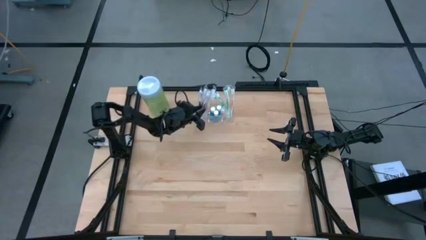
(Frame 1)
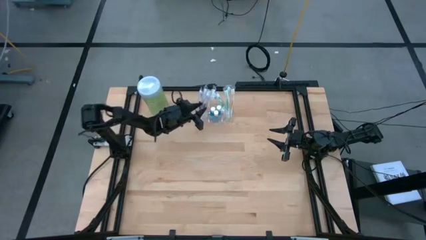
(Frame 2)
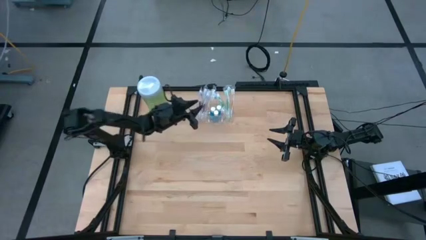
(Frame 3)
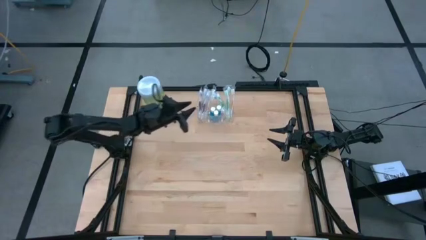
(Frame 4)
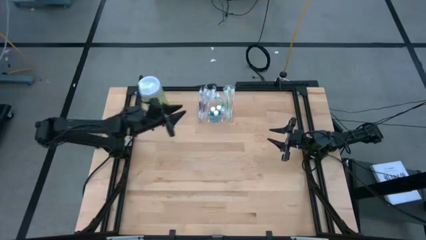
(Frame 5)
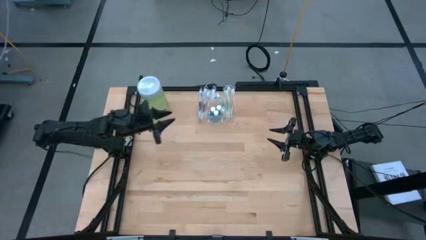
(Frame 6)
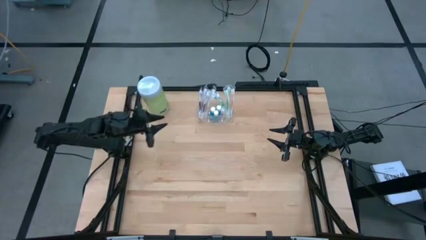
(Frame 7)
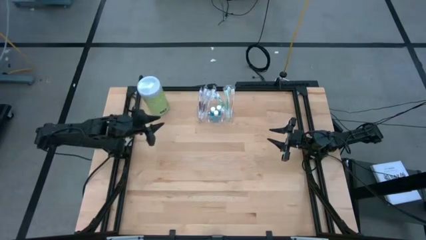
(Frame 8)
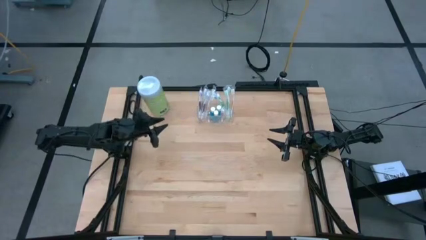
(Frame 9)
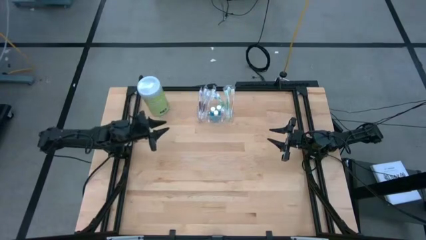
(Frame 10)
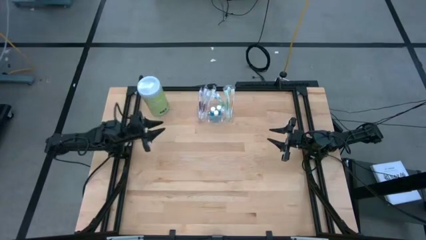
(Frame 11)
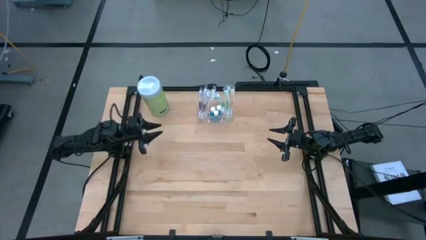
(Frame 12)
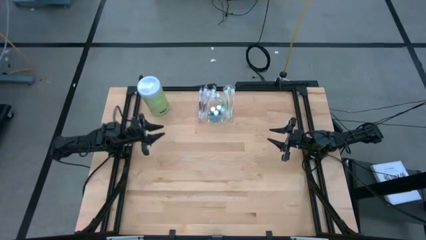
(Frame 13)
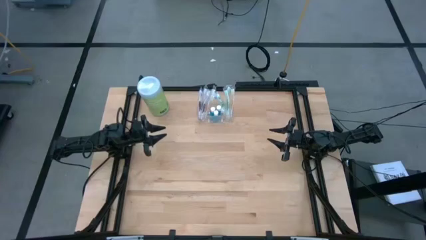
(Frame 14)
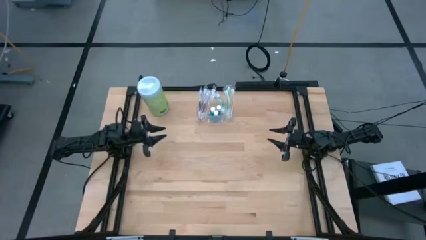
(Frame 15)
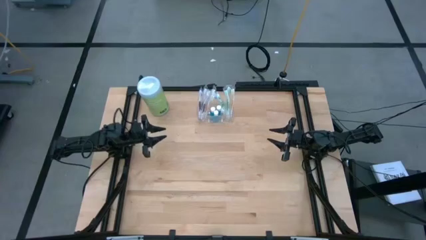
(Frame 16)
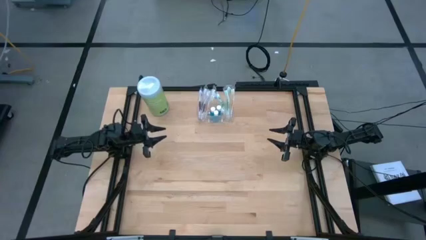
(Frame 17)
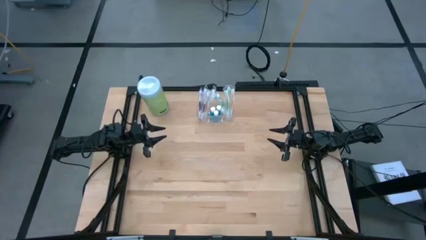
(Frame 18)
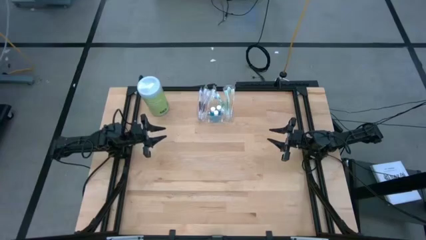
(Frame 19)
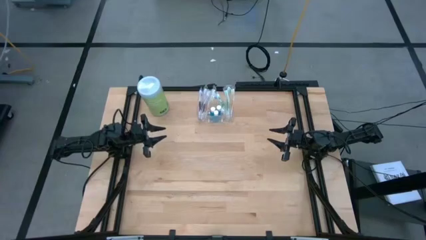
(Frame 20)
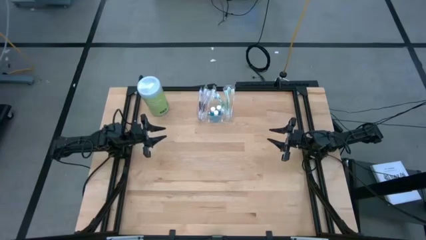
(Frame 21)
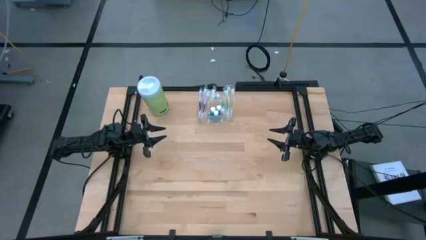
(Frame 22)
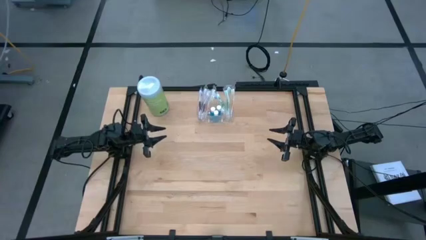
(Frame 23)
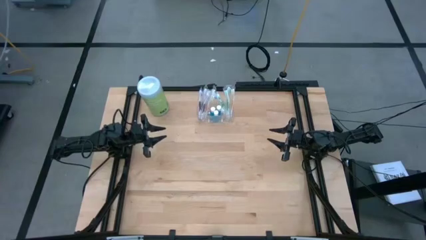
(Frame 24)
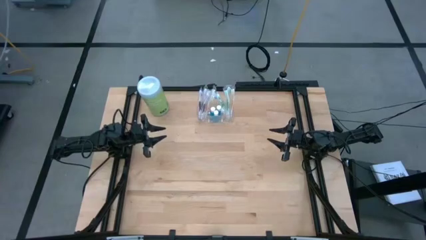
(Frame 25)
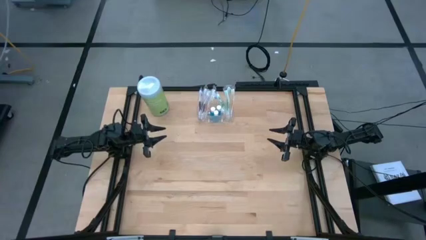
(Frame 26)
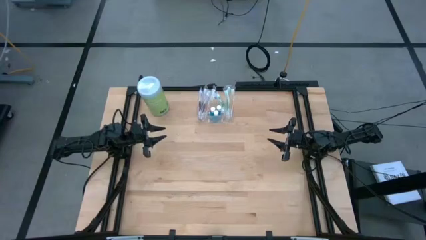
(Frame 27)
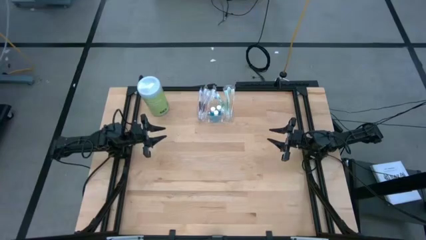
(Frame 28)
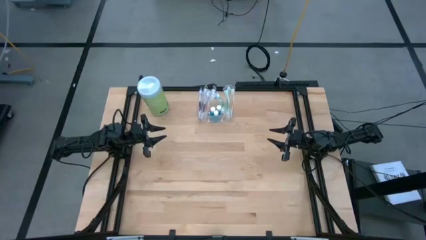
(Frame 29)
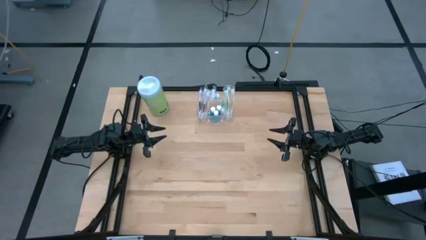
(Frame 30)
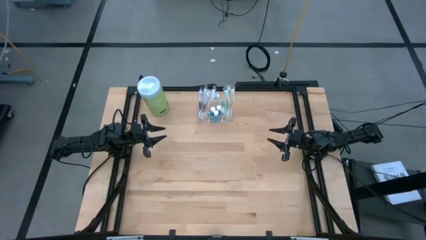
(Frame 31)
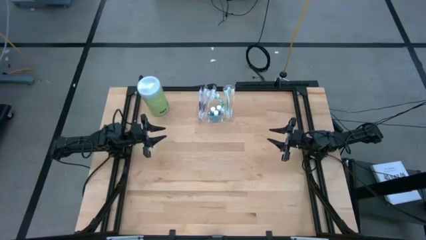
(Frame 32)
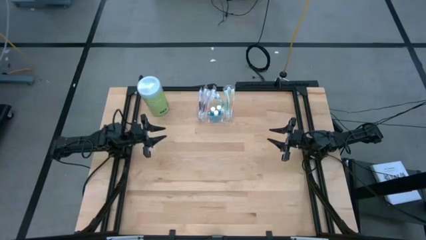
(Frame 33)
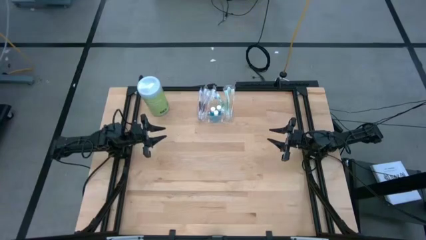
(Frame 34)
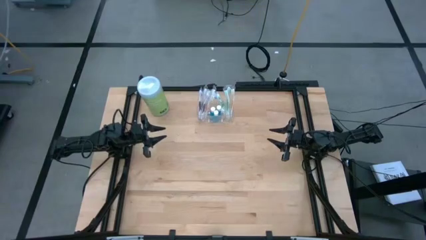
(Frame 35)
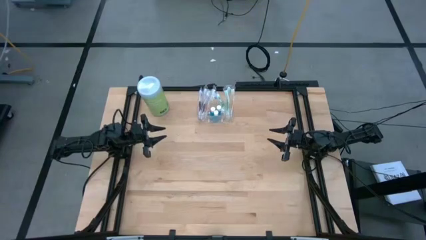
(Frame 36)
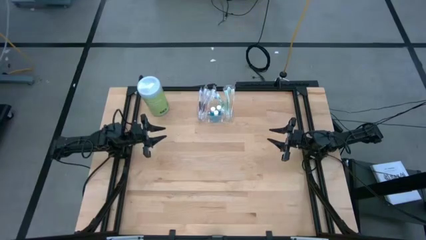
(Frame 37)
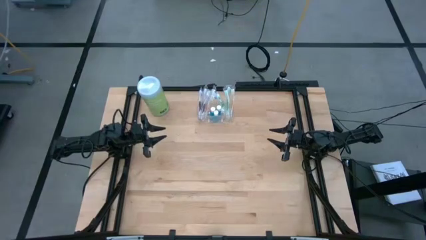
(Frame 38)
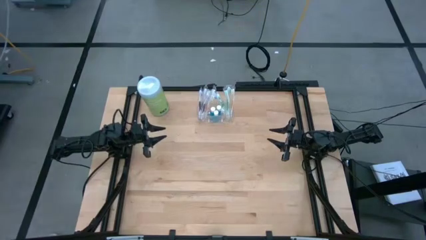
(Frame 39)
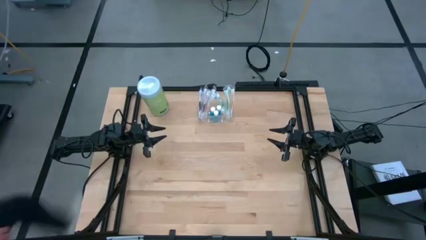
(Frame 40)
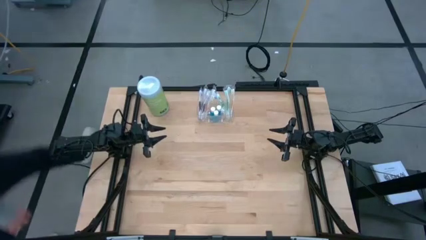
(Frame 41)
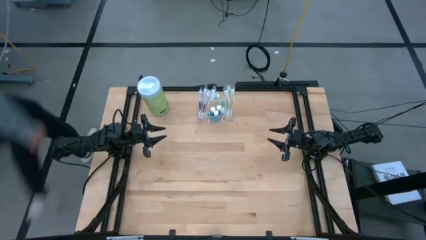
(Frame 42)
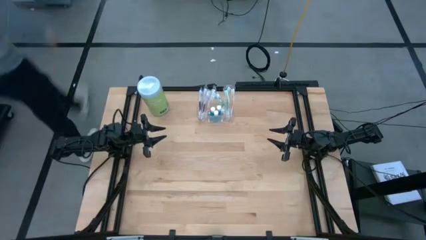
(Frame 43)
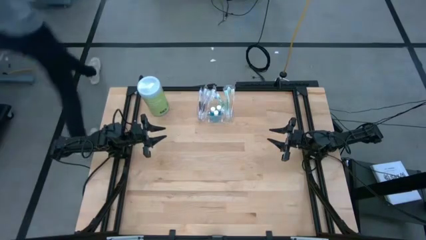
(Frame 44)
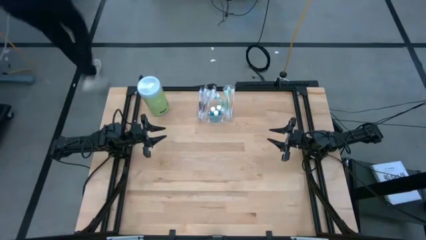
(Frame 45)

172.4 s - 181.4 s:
Task: Pick & Place toothbrushing station
Return to Home Position

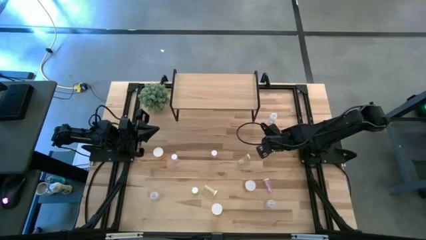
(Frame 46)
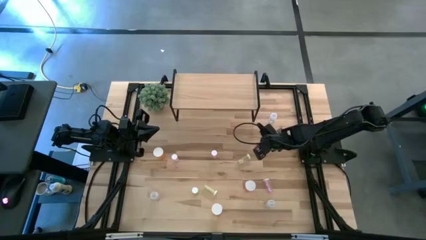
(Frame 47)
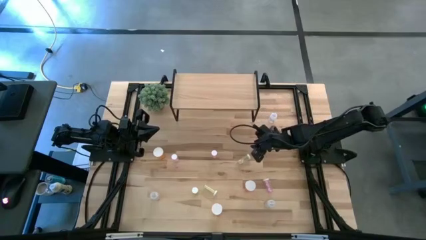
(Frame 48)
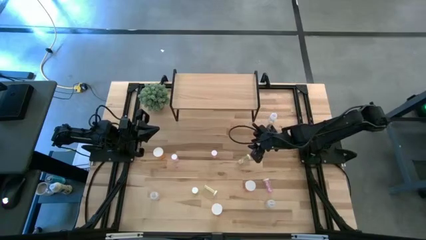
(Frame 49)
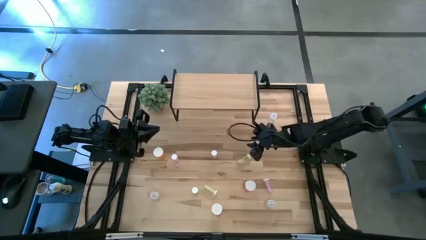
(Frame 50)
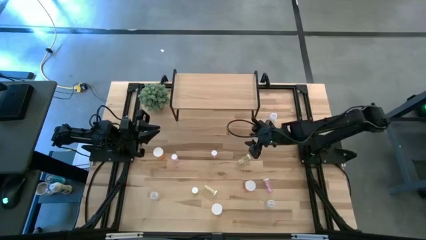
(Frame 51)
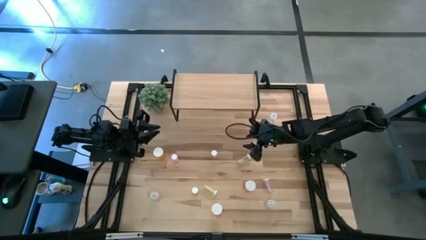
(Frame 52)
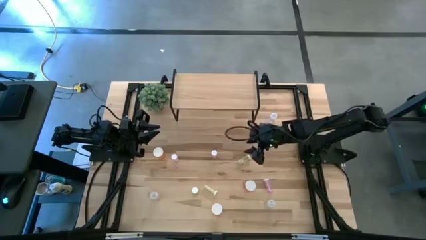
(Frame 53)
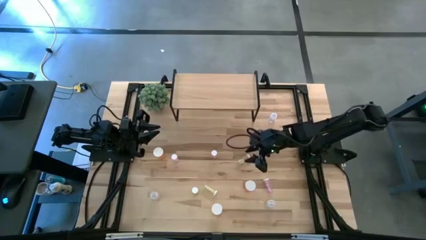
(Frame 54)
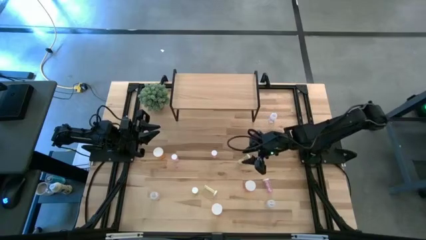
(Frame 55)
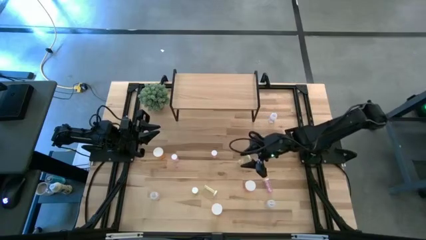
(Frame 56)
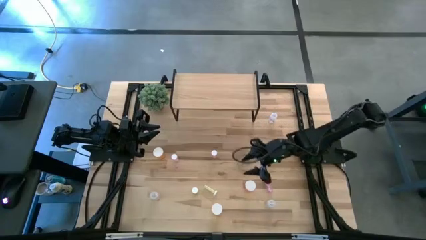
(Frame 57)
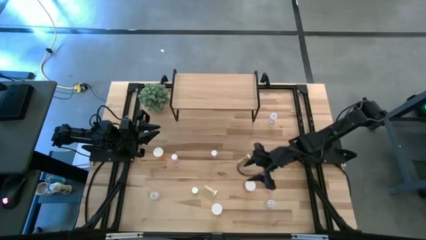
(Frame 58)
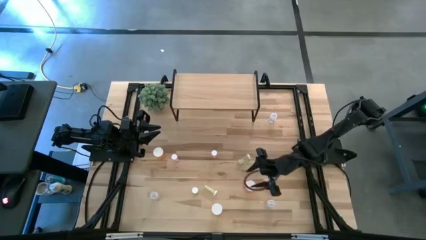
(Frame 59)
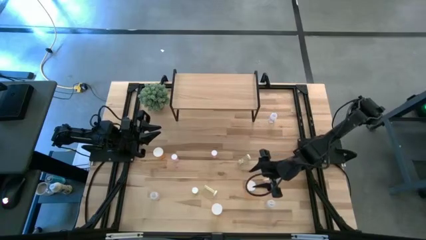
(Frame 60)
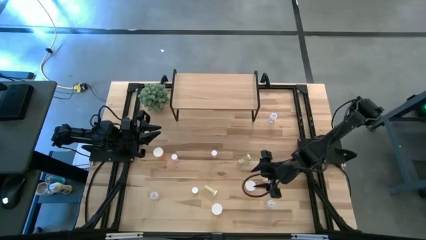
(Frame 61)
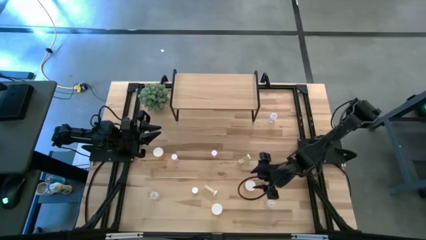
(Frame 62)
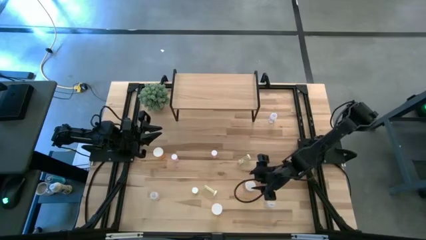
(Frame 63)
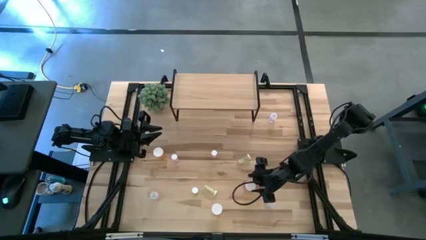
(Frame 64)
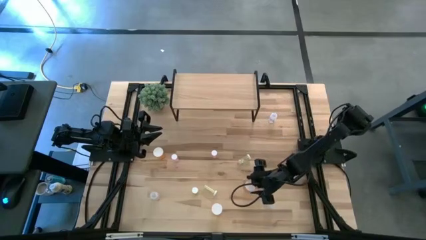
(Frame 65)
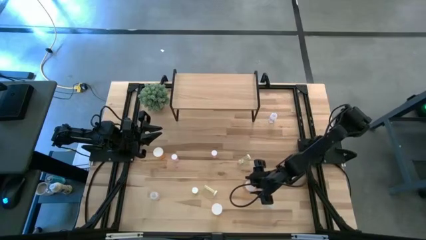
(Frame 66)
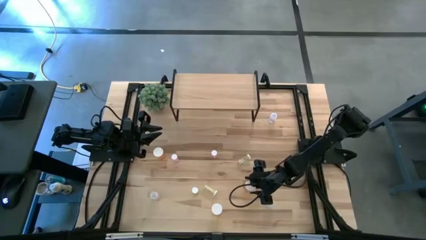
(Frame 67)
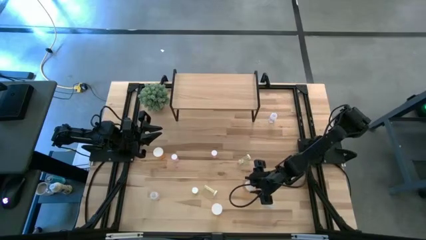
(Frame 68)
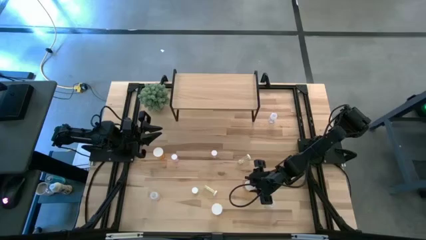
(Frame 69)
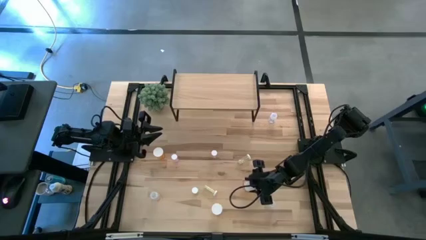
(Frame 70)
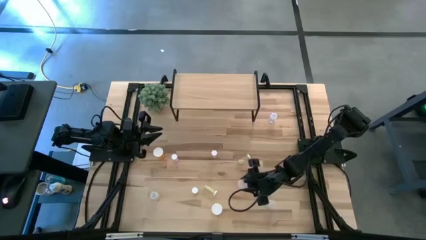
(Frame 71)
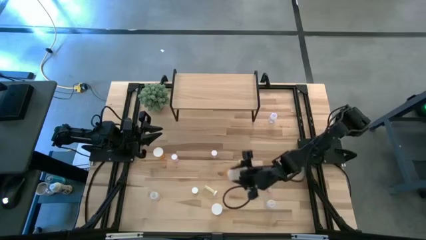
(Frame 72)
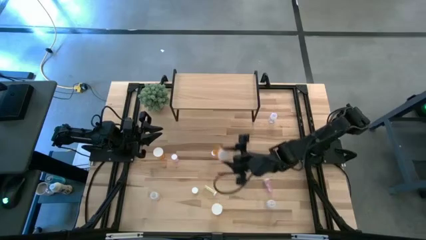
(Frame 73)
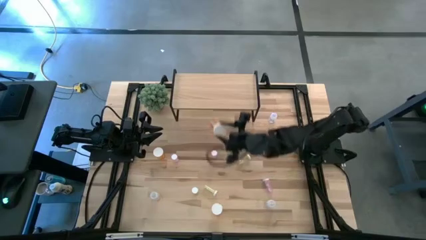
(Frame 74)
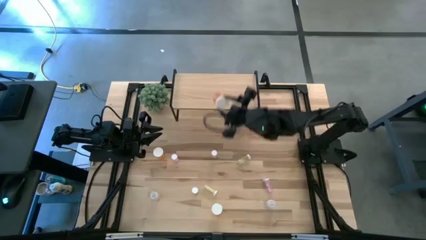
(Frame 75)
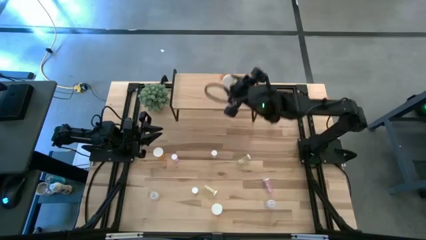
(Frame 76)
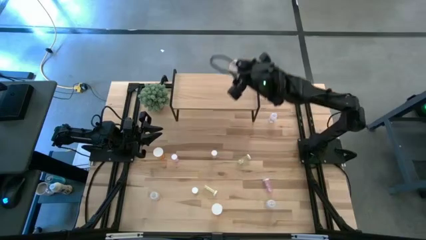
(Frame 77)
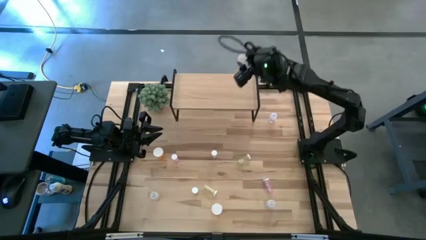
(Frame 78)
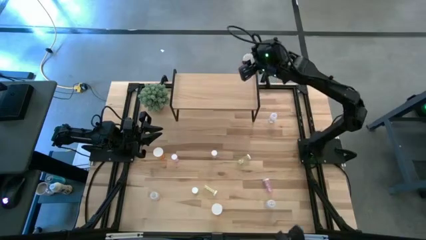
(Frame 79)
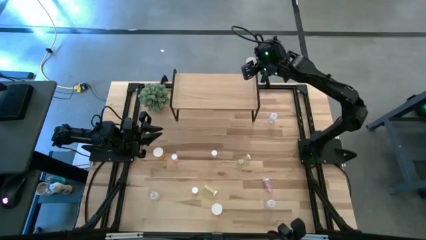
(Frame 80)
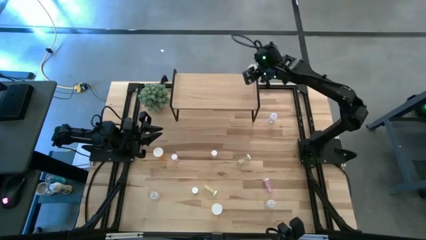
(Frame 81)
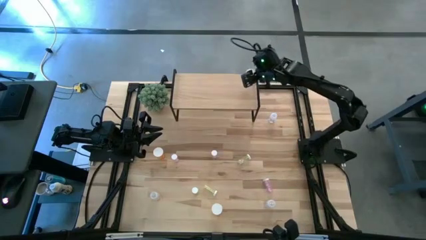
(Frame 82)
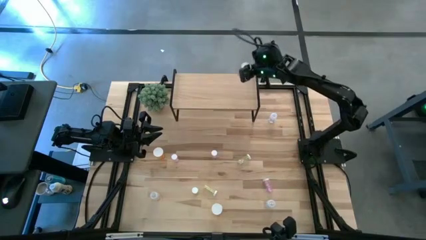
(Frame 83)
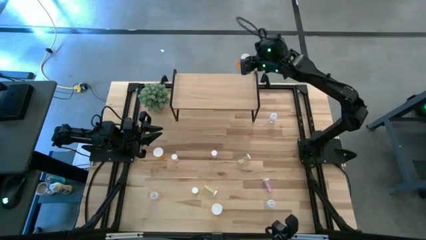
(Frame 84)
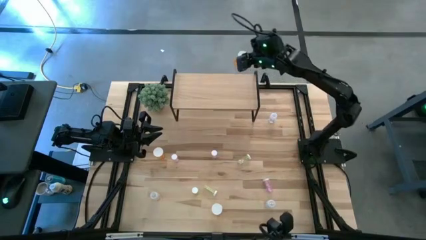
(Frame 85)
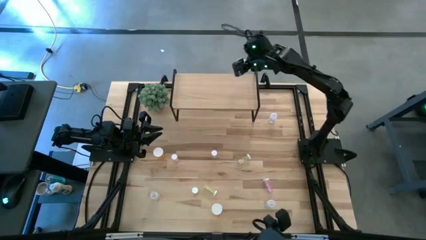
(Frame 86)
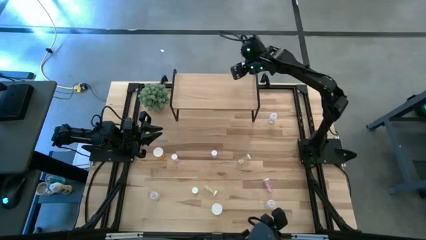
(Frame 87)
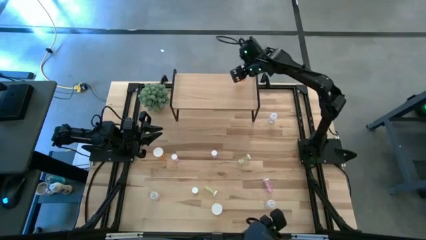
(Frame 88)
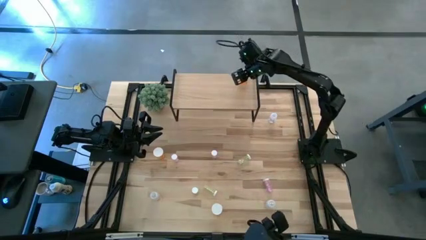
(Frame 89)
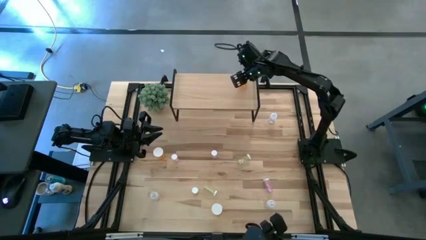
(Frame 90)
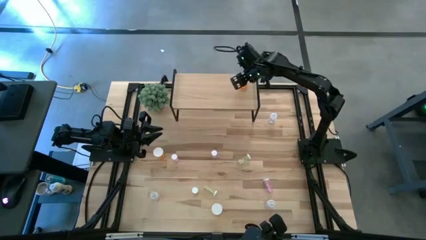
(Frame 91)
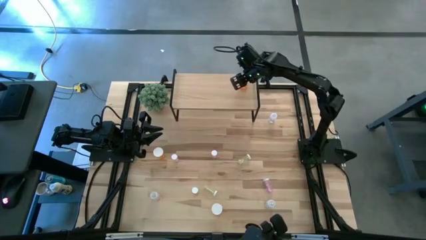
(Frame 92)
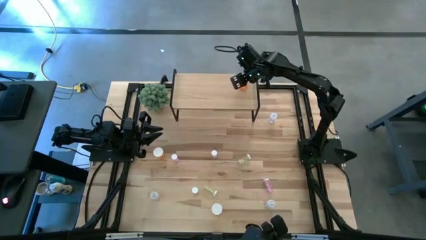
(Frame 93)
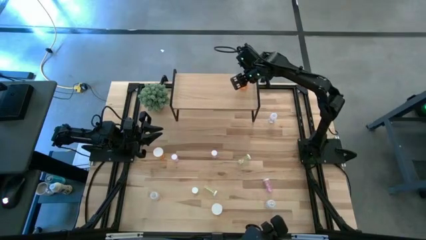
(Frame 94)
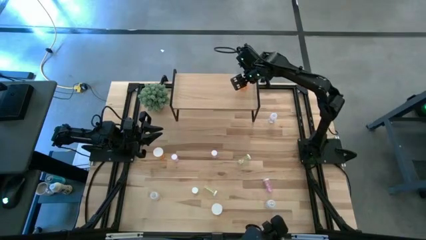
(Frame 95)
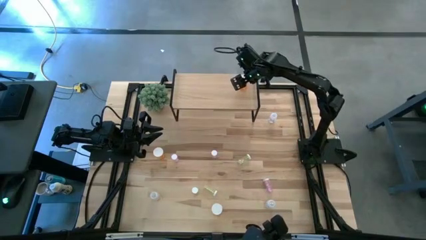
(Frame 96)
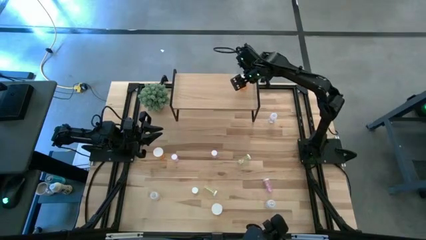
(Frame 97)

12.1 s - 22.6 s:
Task: Pick and place medicine bottles onto shelf by color
Put the middle orange pill bottle on the shelf
